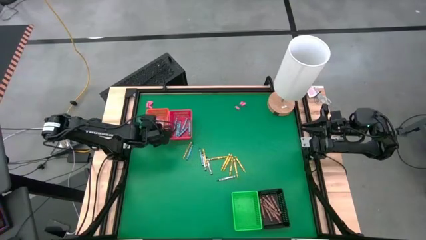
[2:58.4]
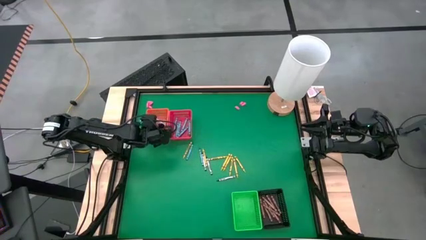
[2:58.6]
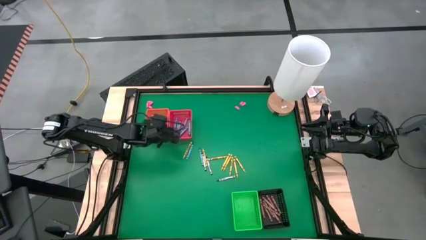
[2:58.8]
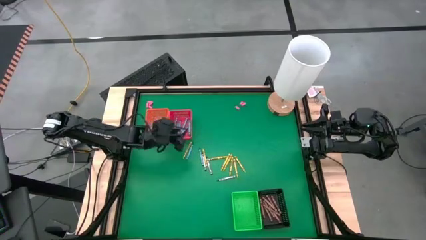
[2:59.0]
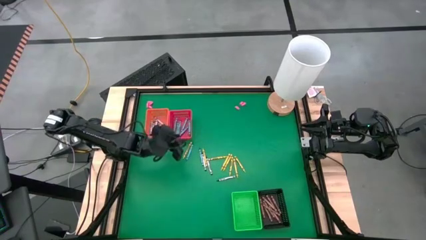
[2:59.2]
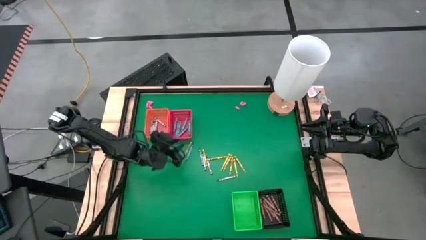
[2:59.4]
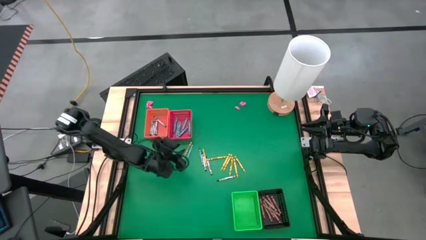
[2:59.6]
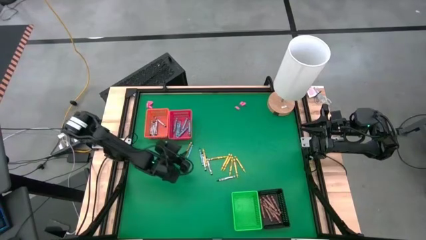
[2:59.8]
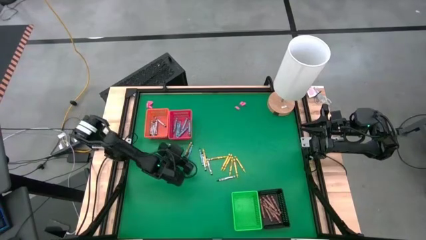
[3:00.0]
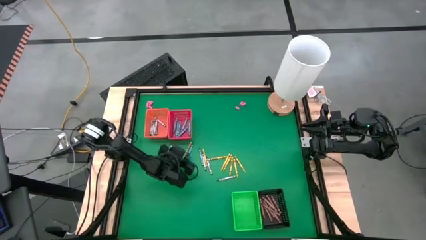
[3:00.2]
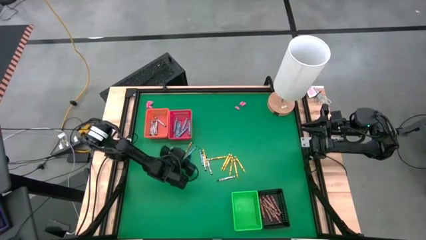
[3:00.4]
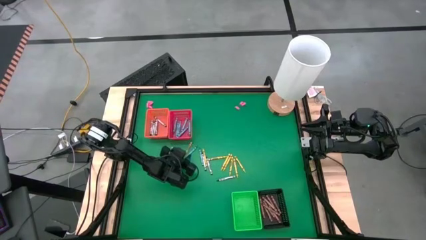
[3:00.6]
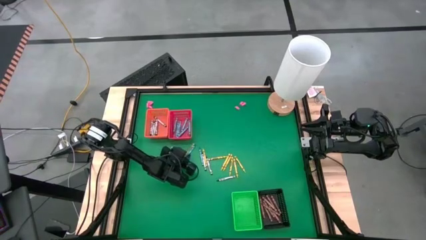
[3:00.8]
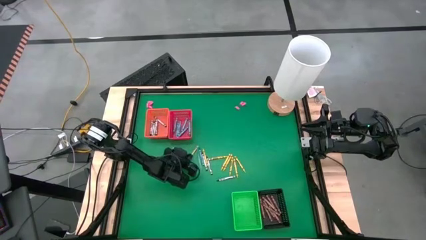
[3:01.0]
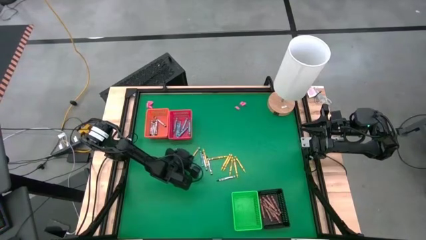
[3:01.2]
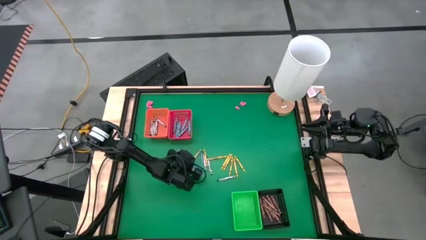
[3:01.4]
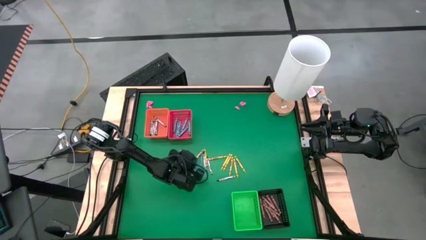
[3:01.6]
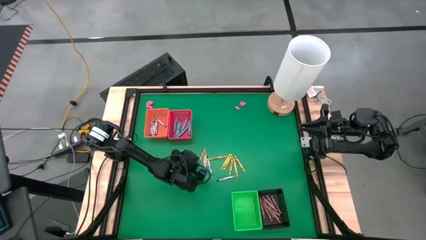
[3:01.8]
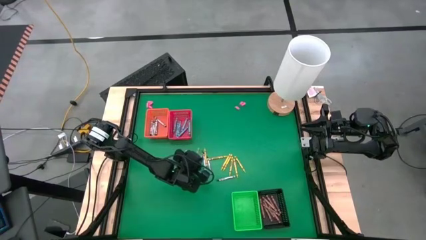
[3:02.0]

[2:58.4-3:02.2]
Task: Sort crayons
Put the yellow crayon into the green bin

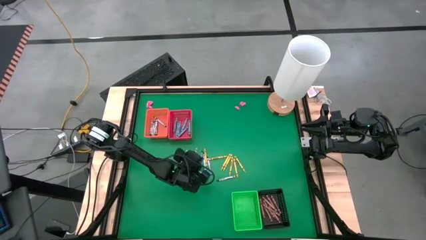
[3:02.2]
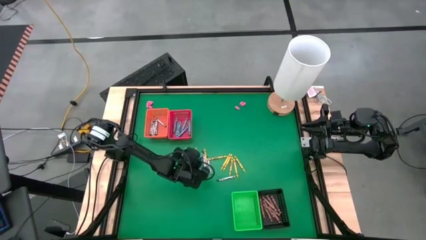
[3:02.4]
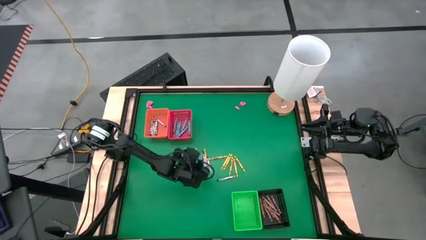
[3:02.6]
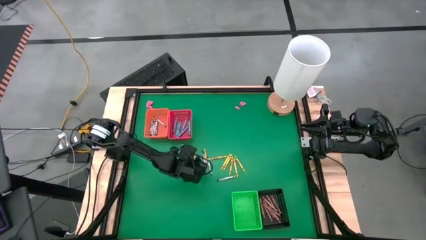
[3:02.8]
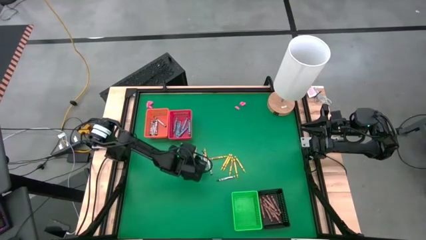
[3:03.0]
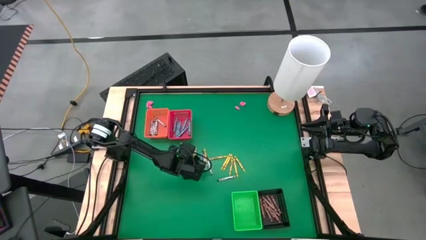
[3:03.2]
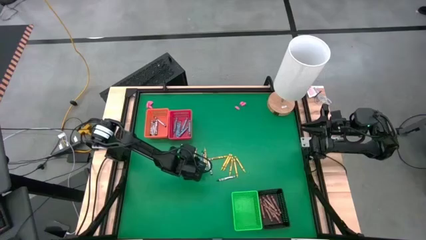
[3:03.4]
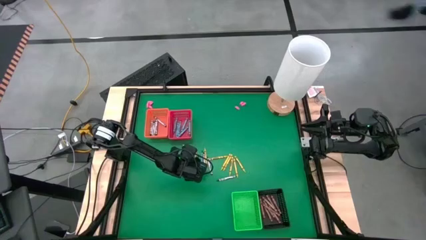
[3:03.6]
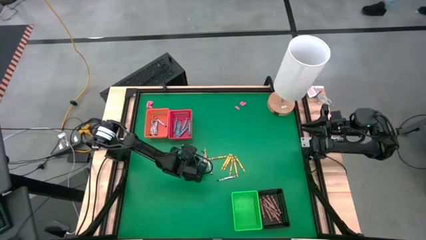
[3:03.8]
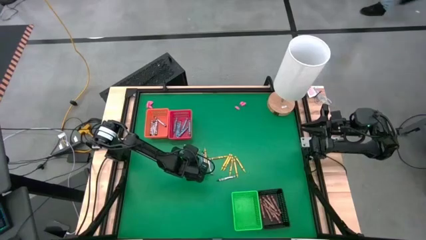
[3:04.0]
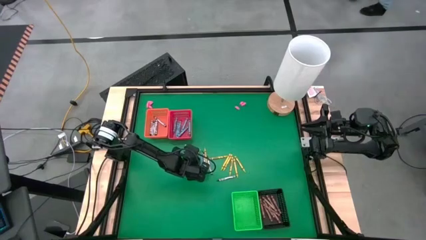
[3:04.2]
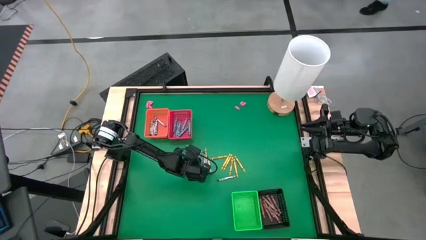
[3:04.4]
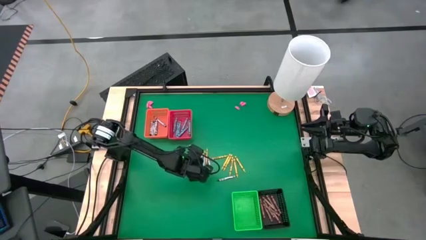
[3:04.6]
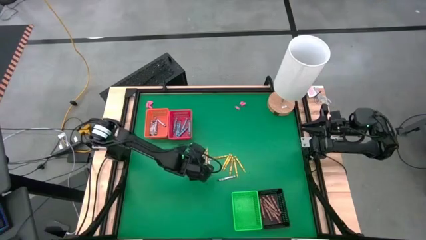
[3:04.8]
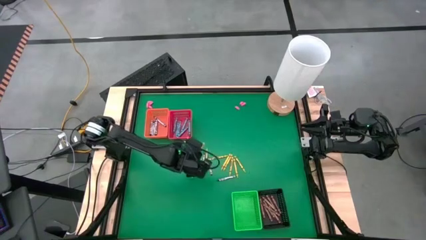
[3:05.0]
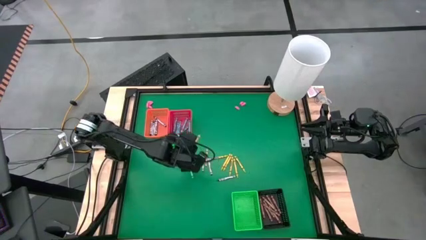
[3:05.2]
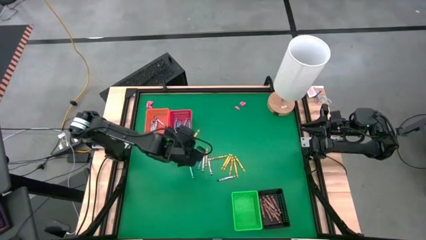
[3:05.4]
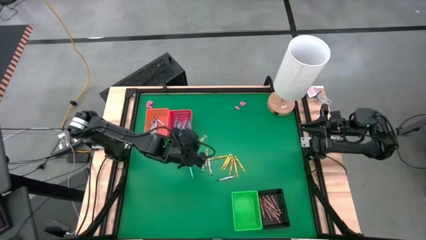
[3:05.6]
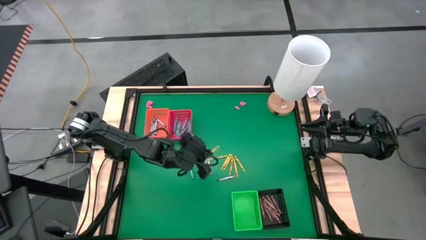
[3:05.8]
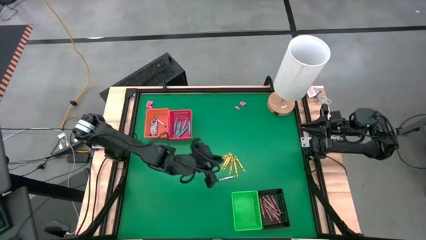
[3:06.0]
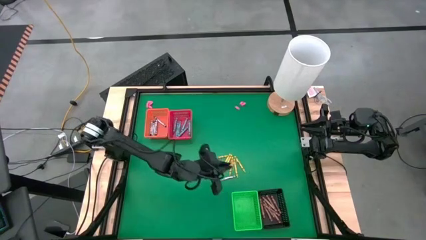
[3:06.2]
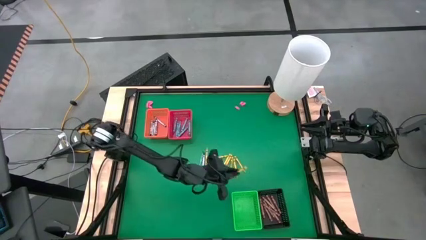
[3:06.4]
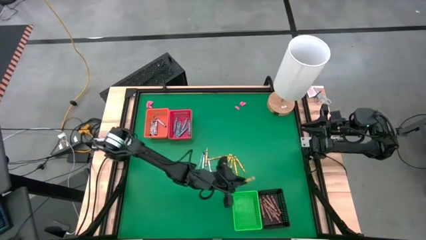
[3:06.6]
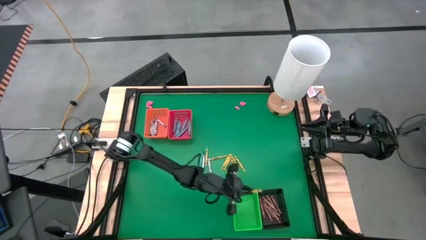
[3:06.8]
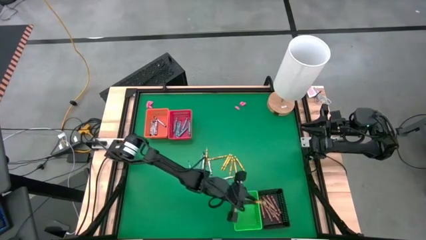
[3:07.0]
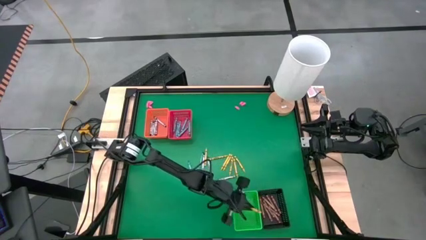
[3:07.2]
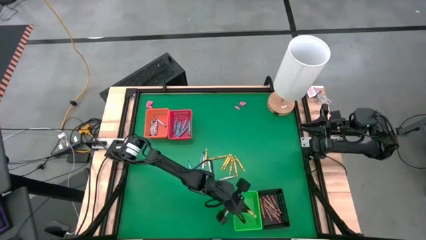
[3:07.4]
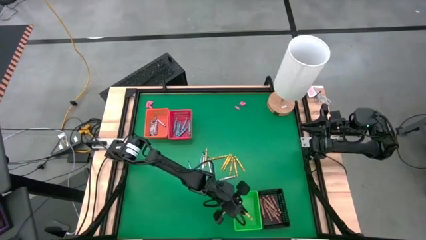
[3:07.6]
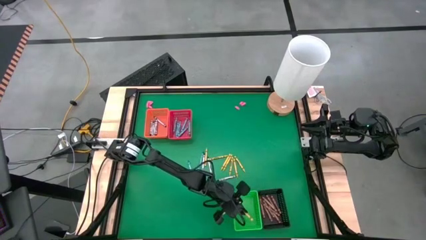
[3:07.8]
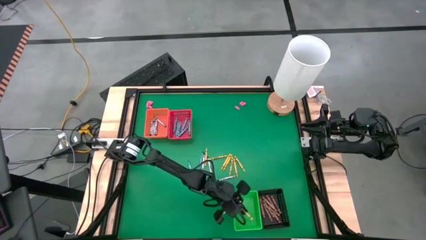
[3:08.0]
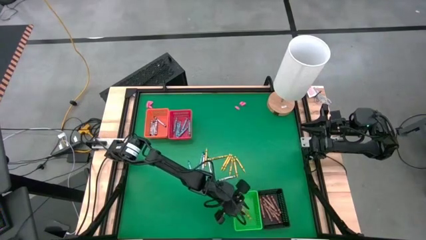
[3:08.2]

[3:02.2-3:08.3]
Put the yellow crayon into the green bin

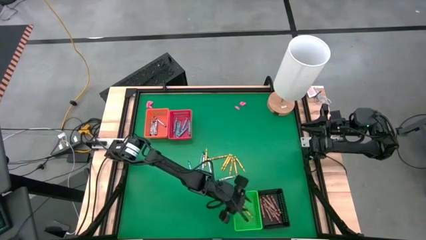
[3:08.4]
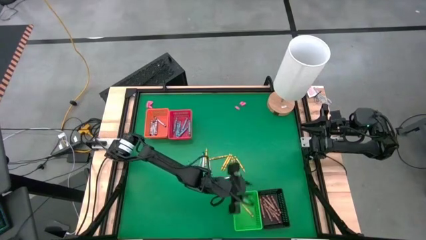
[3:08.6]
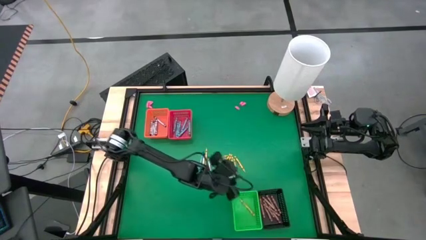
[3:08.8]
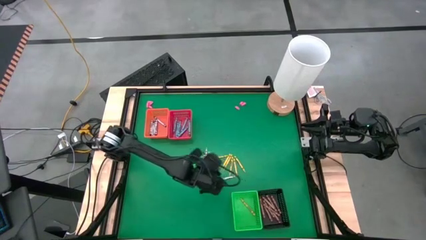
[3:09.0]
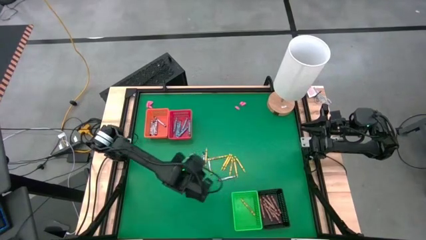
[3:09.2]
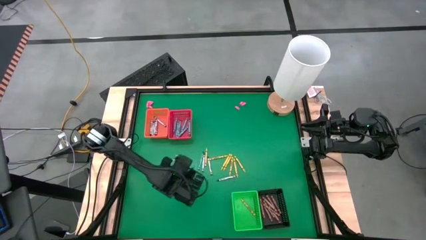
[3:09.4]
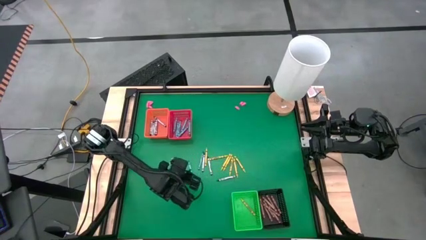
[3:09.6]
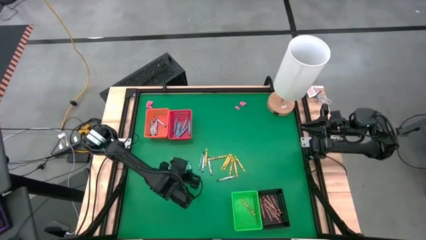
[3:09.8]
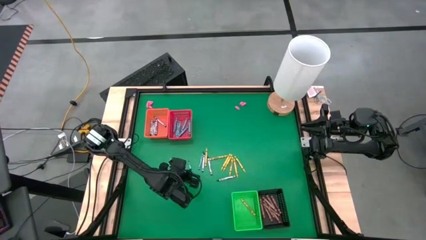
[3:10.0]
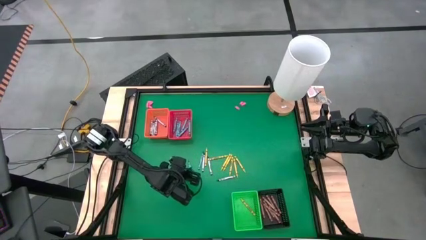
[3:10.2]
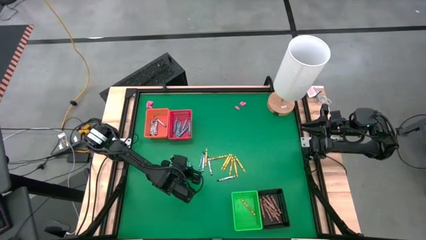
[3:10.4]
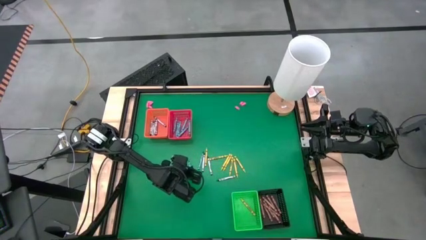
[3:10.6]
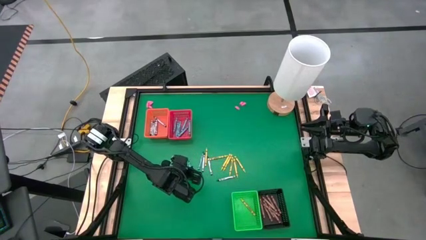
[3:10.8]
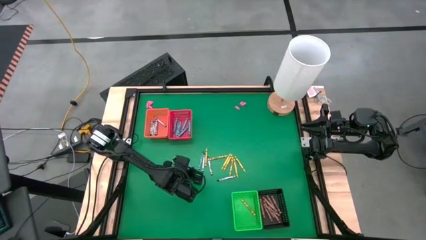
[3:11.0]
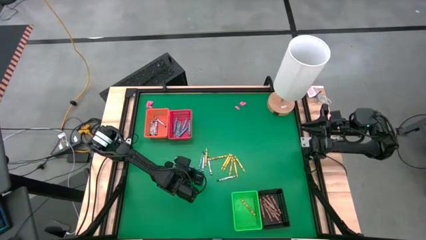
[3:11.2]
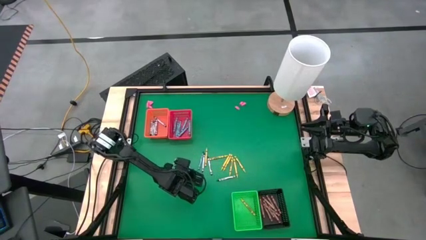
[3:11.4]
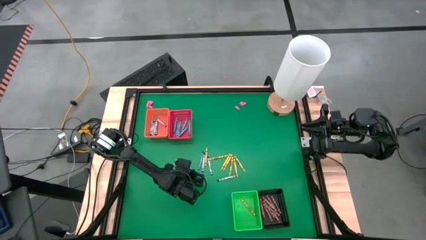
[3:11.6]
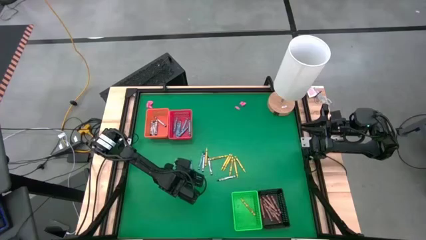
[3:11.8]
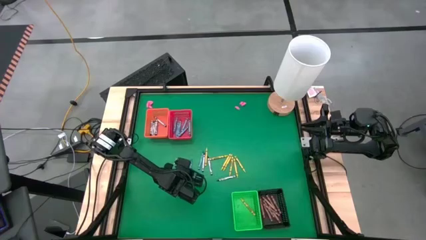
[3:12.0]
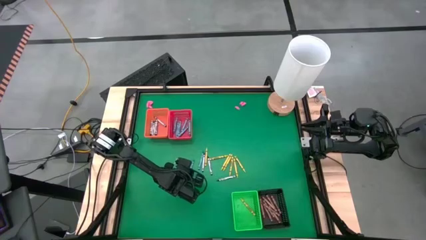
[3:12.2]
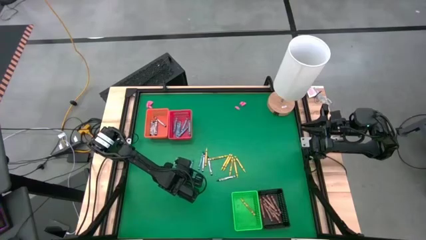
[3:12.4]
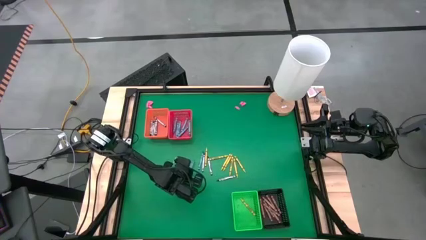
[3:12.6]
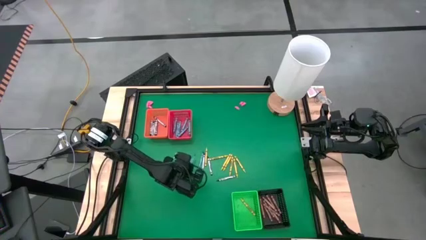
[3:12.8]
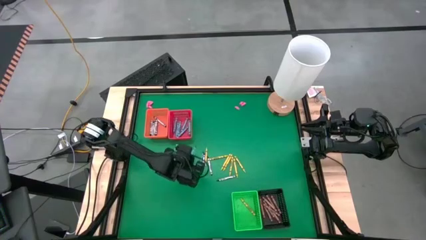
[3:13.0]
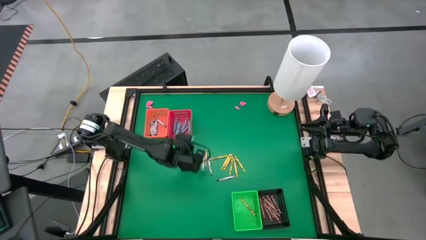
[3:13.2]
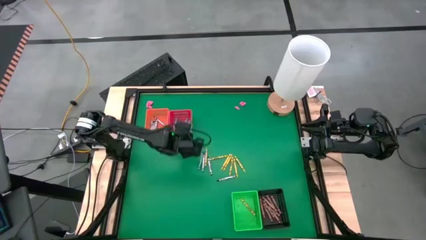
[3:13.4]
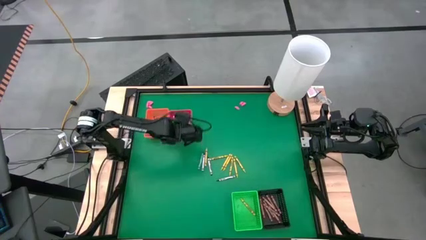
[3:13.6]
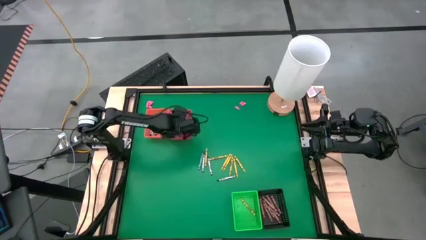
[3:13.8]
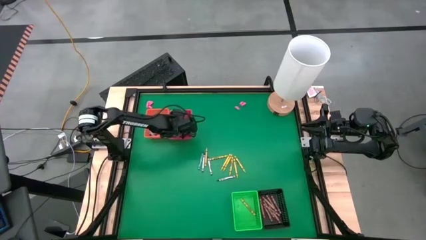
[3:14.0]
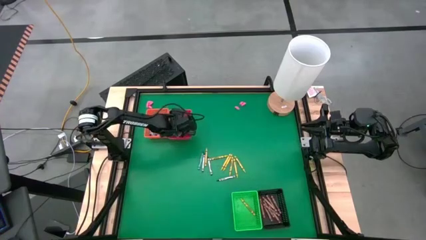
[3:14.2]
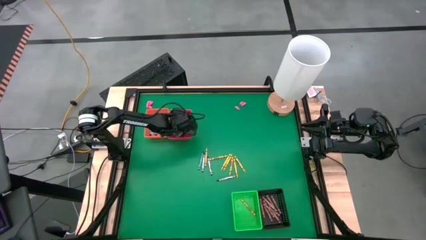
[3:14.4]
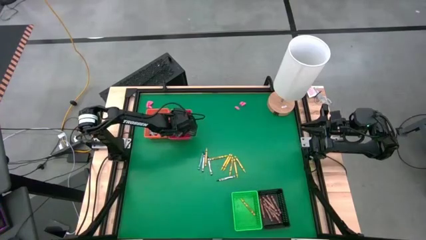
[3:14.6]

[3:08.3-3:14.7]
Put the blue crayon into the red bin
